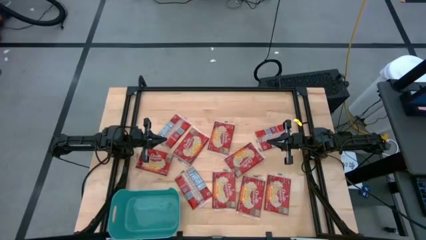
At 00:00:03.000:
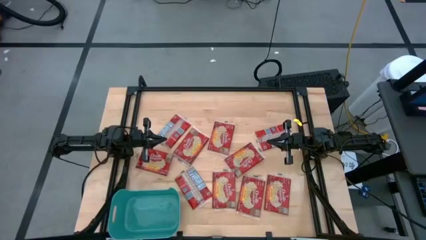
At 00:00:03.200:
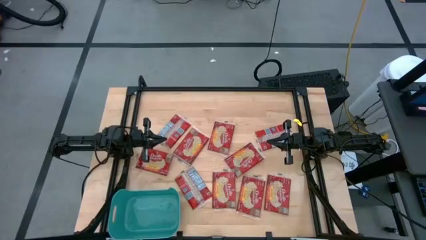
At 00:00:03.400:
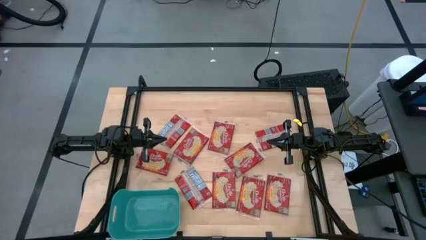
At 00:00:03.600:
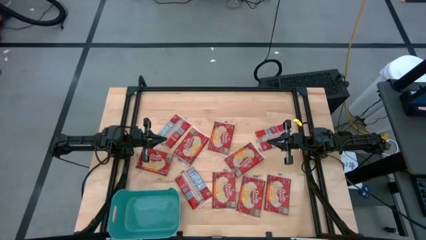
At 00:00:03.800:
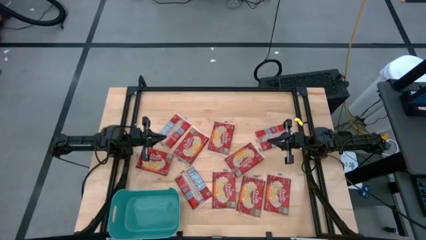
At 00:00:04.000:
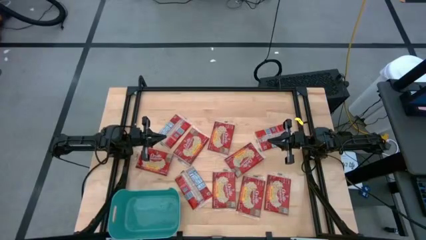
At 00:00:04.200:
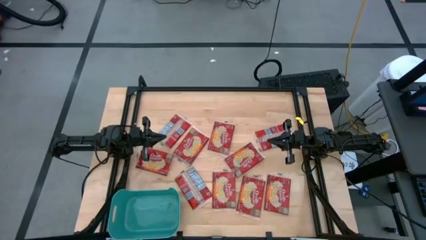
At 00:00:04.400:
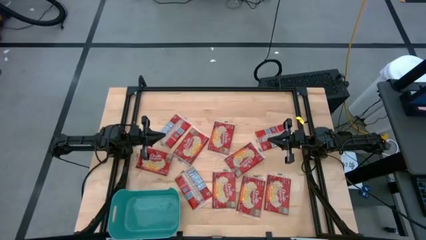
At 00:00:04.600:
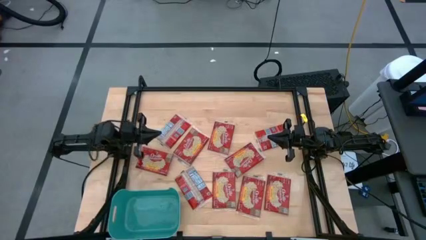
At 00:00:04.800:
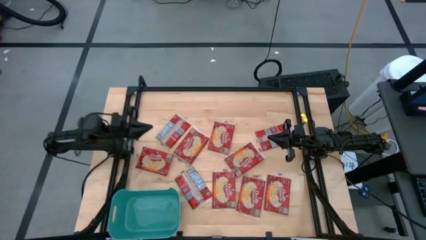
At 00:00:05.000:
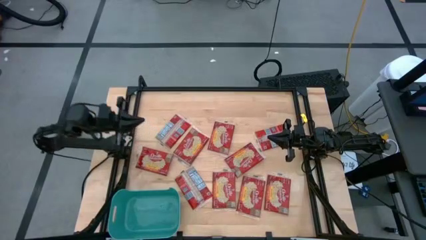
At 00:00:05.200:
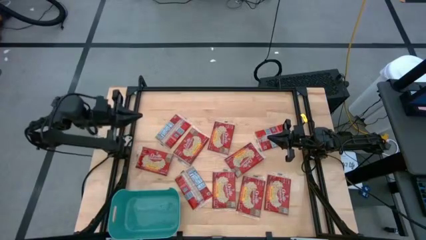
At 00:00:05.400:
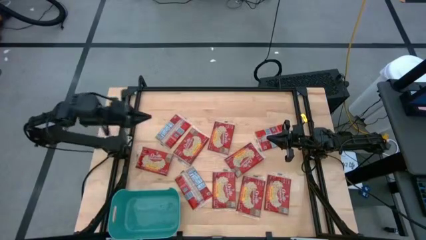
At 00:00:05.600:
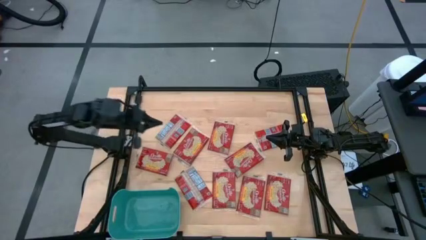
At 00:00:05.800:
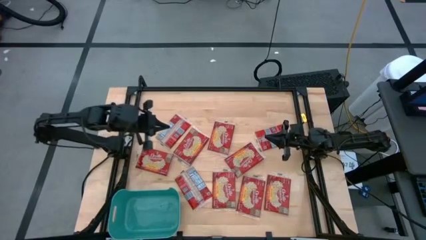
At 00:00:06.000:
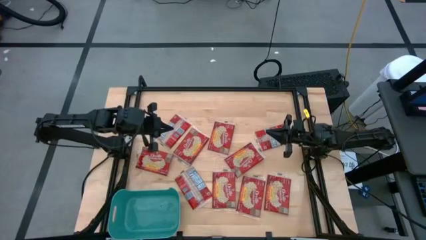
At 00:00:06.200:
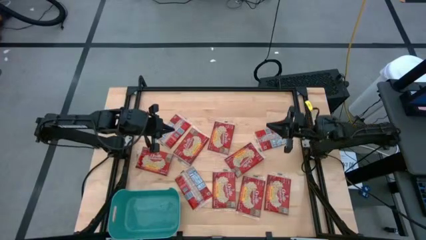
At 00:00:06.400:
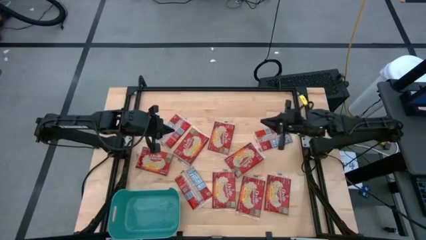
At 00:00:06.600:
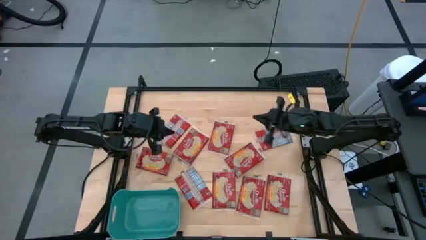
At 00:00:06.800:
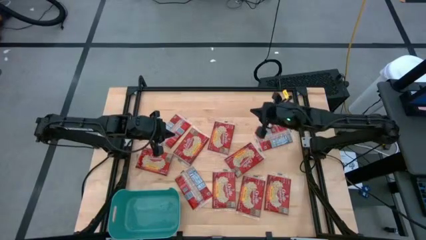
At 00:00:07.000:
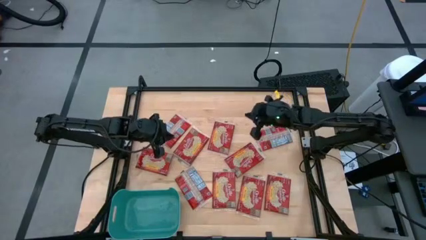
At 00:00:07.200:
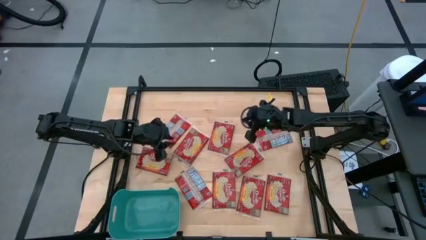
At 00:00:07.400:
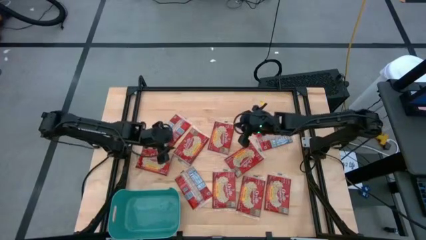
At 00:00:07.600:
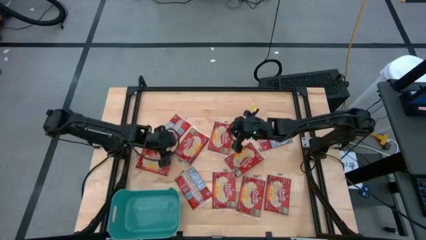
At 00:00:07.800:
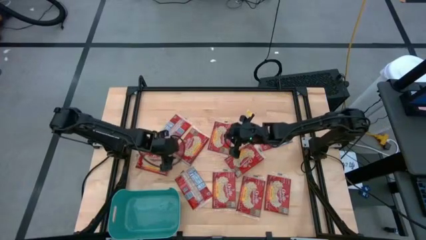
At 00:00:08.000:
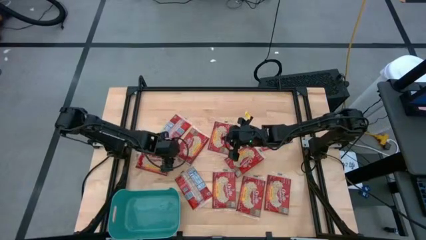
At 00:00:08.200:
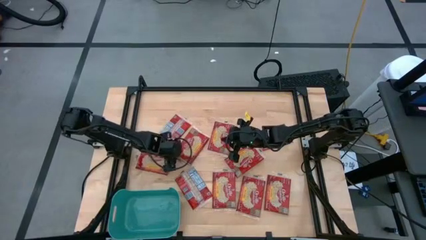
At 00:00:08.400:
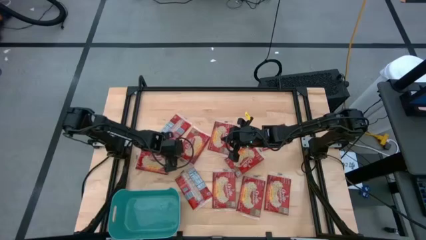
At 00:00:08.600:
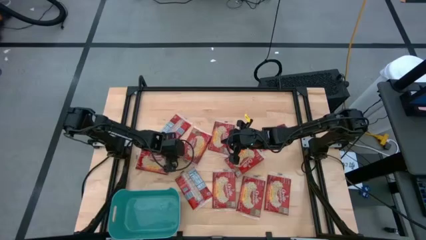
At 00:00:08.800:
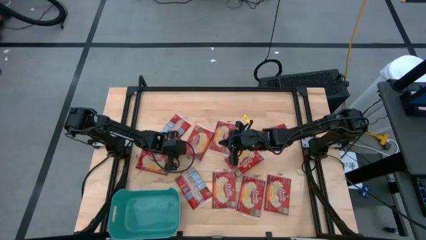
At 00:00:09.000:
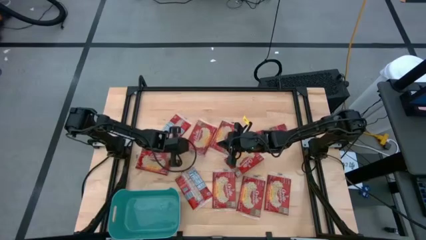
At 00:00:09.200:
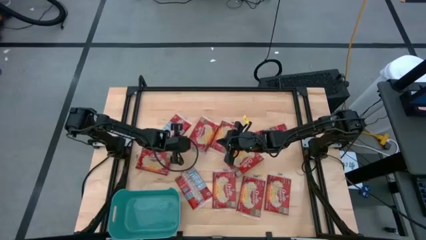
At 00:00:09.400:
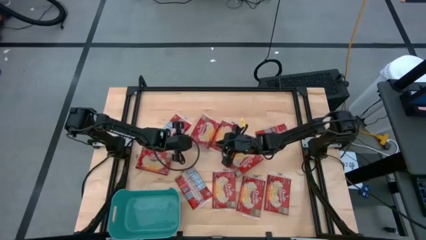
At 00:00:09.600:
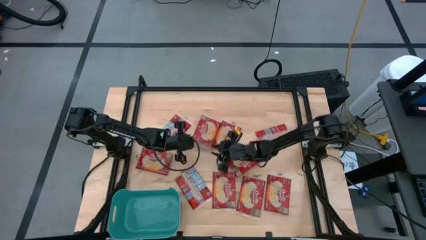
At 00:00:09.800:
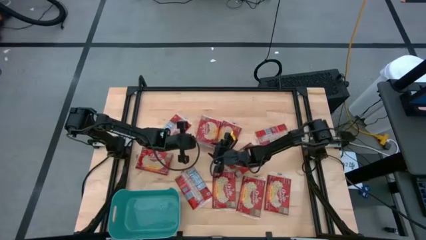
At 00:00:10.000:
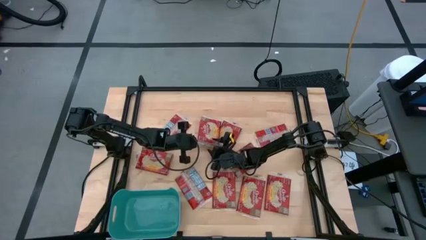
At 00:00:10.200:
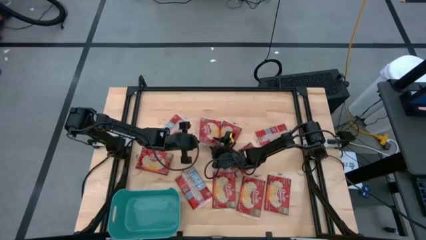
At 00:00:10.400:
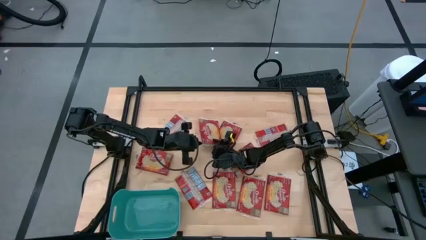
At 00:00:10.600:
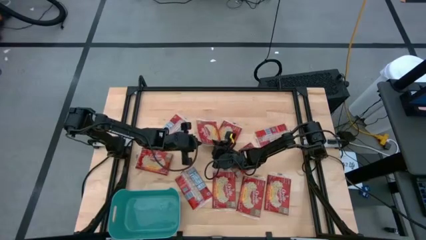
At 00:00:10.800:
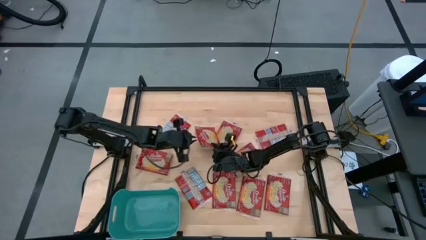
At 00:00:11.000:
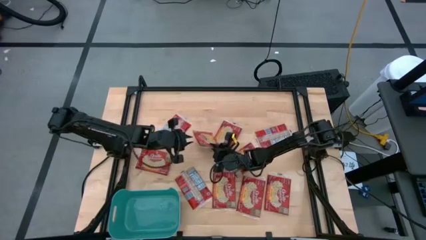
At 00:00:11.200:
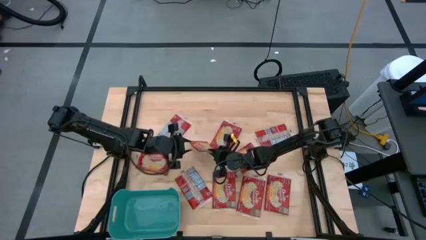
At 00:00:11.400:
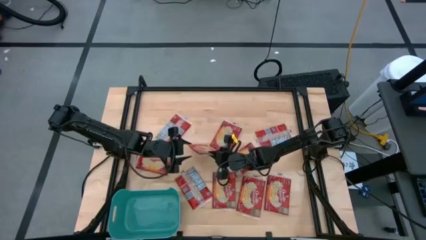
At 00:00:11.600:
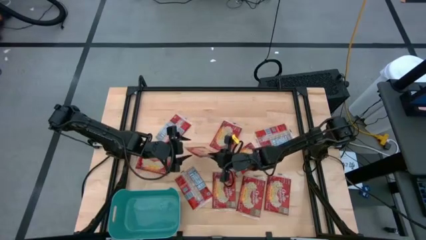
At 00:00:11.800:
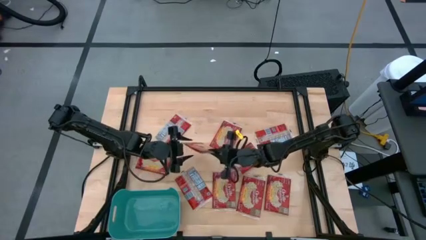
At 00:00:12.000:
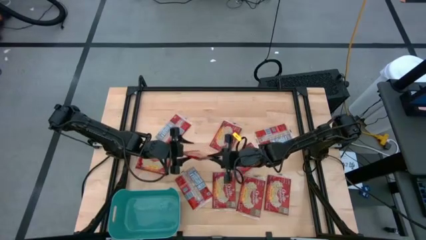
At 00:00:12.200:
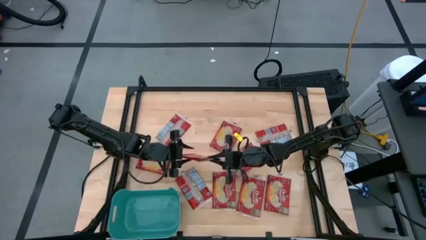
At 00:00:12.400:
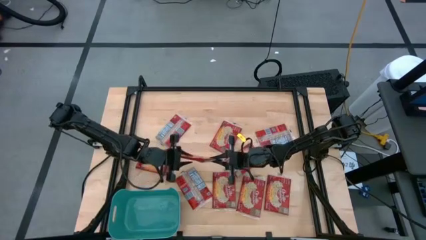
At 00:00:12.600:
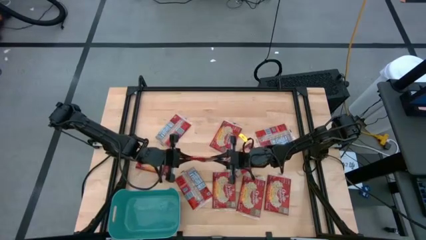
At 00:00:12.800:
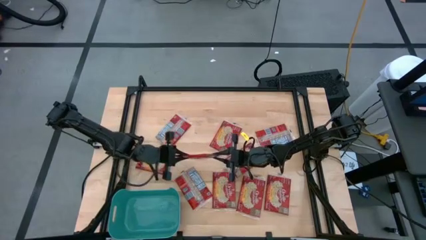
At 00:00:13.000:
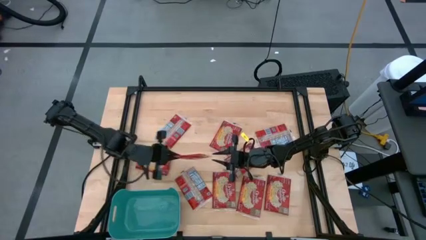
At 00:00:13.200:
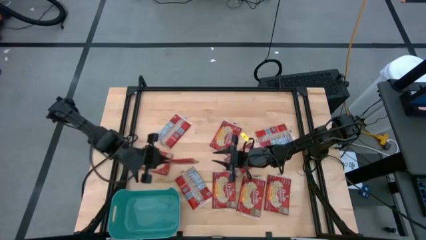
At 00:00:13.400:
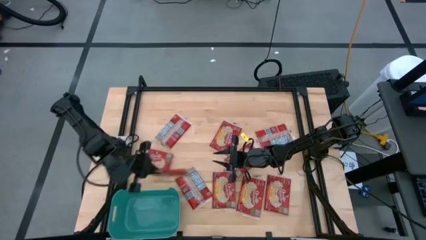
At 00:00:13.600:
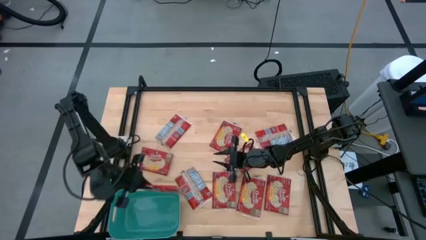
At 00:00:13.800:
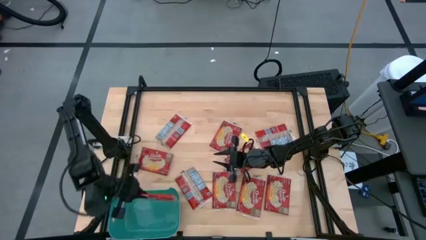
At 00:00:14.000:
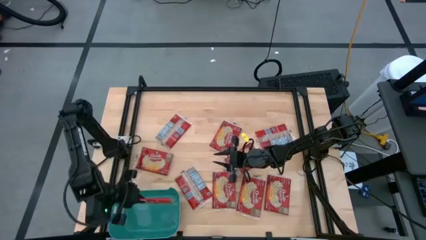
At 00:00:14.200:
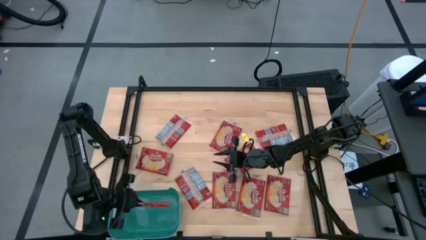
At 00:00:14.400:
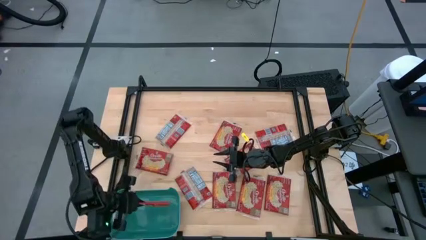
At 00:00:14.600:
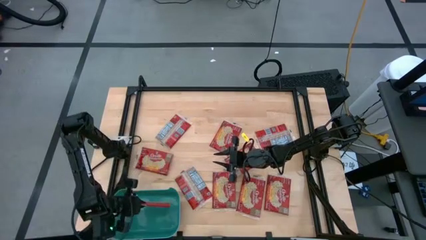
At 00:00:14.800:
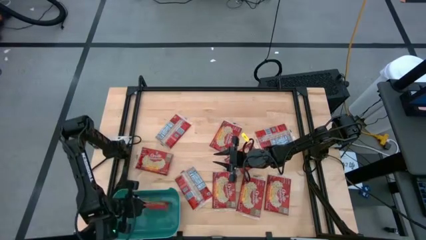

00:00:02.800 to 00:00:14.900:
Task: Sort popcorn bags into baskets
Put the red popcorn bag into the blue container

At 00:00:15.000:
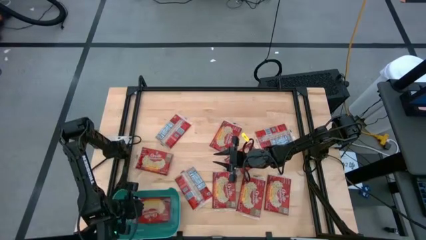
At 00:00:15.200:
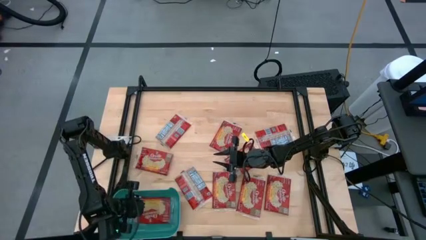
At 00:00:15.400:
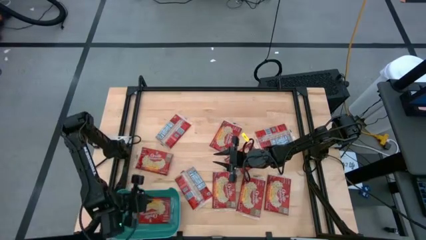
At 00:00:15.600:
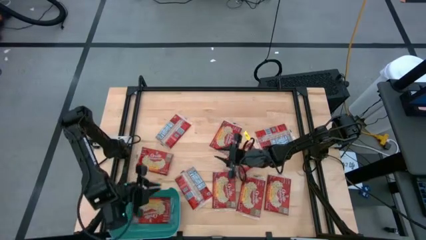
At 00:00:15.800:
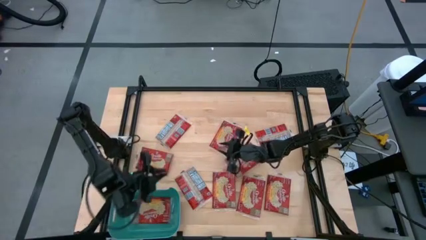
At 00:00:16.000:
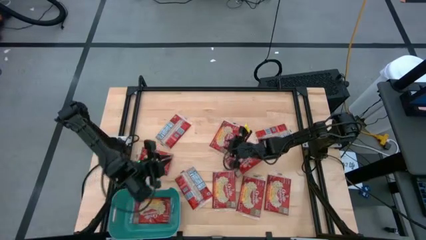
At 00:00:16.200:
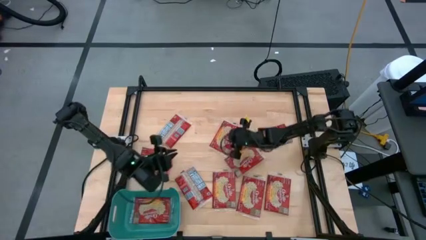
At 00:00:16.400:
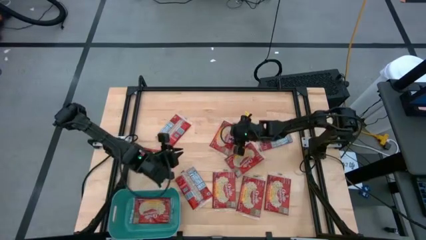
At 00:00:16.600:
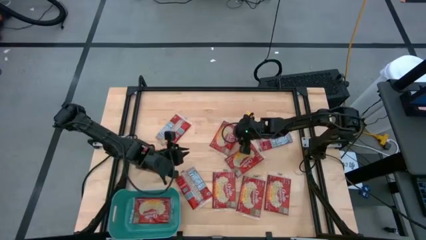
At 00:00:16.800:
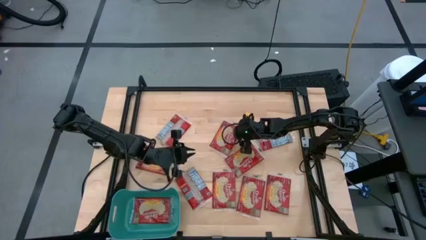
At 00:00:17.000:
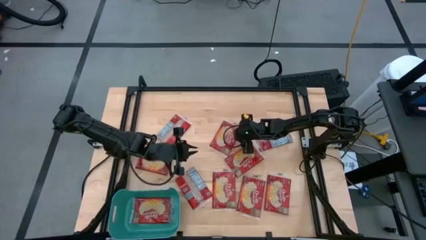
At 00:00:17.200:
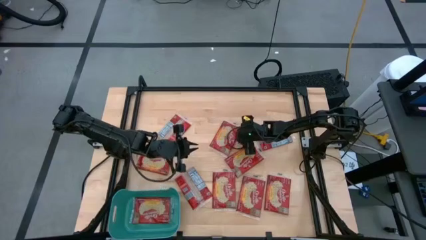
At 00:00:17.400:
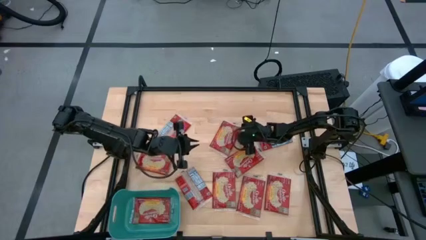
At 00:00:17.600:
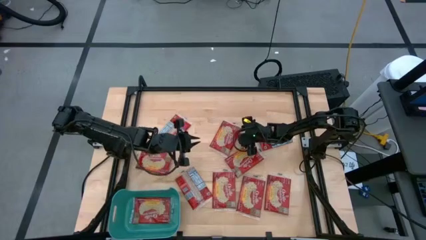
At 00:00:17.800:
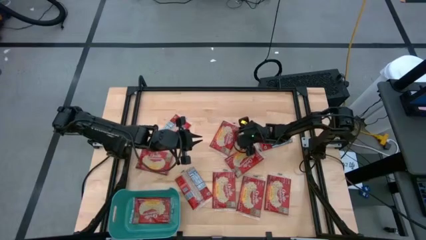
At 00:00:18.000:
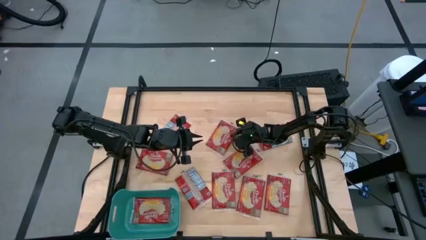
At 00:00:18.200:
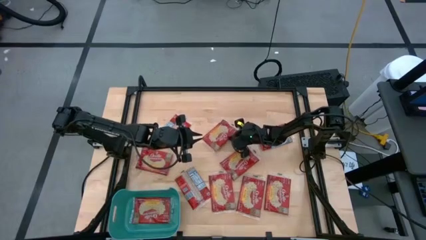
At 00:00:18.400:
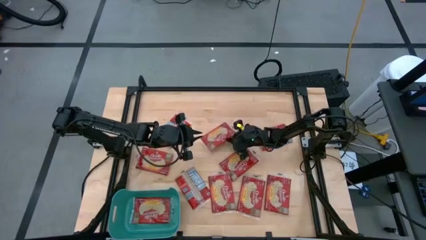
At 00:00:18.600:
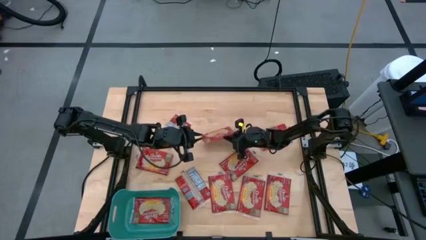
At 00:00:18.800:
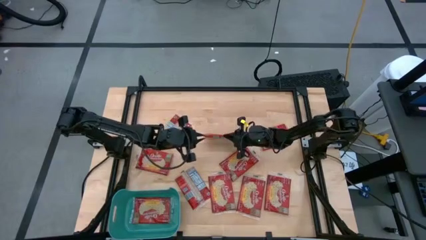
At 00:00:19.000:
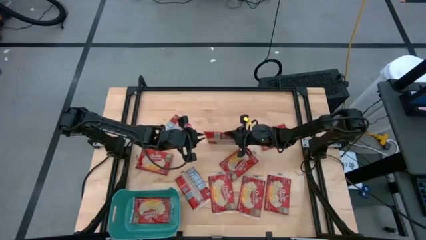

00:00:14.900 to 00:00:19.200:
Put the red popcorn bag into the blue container
